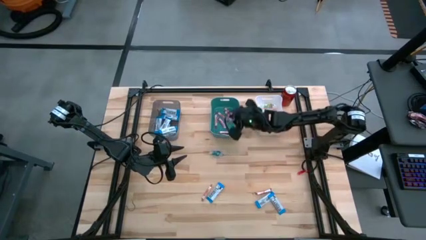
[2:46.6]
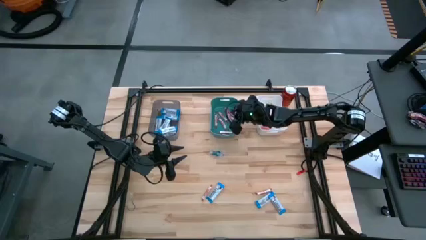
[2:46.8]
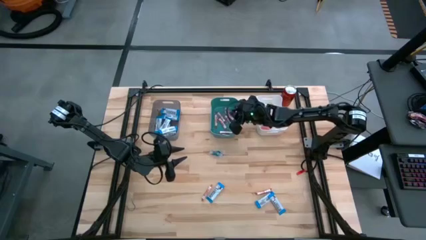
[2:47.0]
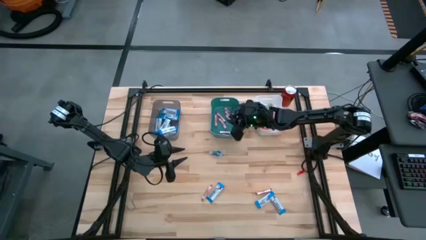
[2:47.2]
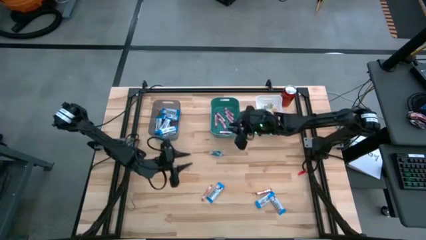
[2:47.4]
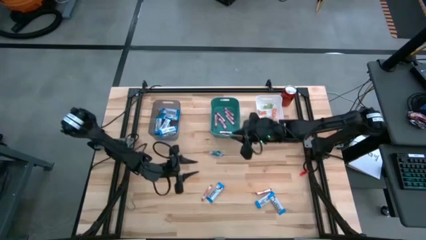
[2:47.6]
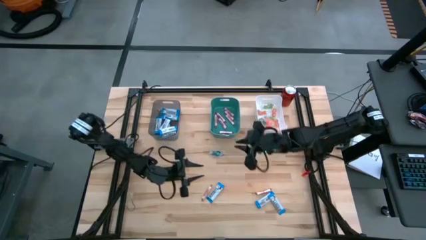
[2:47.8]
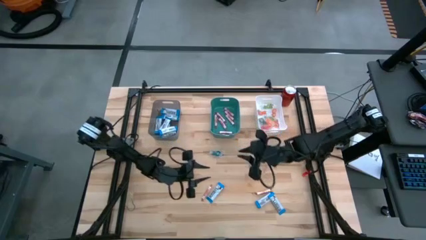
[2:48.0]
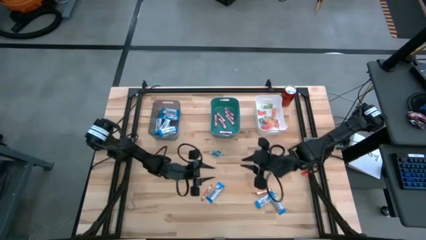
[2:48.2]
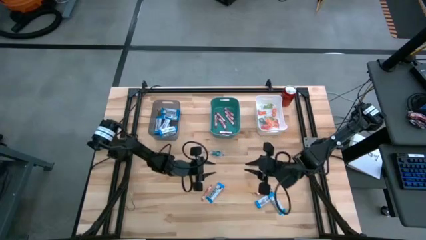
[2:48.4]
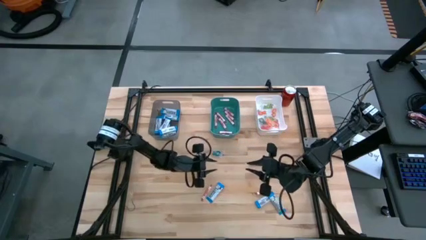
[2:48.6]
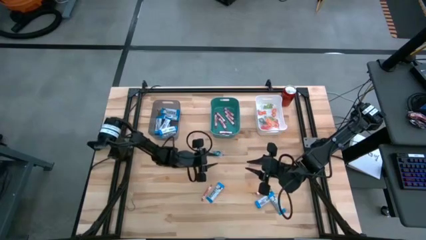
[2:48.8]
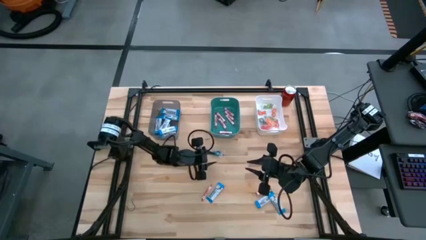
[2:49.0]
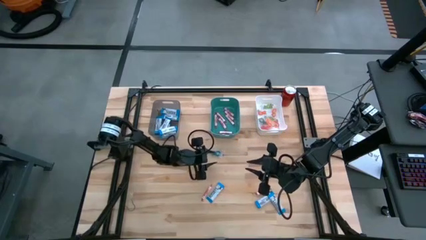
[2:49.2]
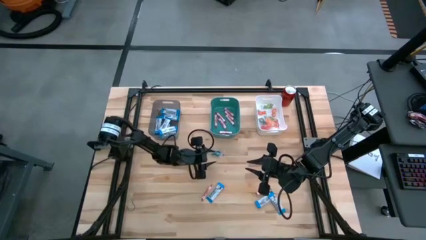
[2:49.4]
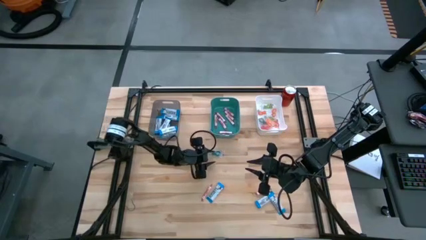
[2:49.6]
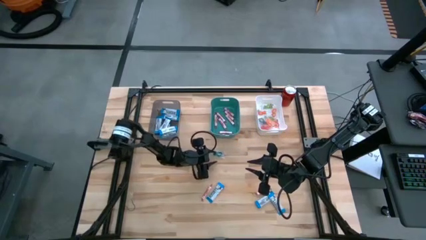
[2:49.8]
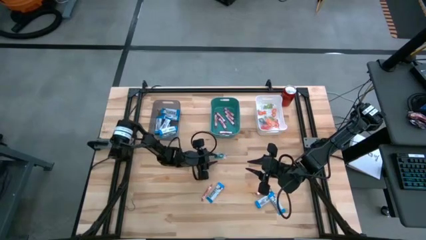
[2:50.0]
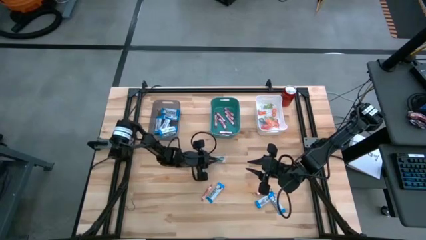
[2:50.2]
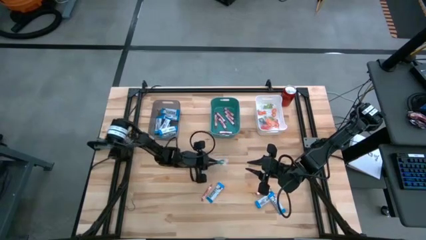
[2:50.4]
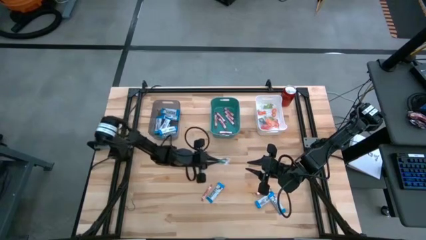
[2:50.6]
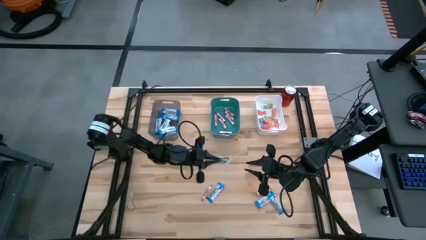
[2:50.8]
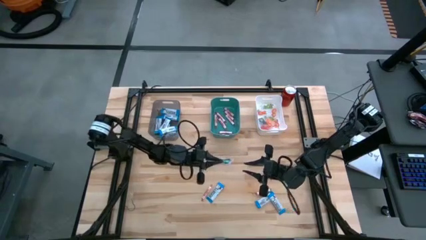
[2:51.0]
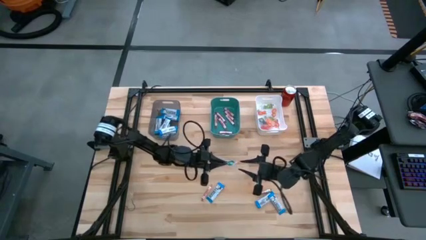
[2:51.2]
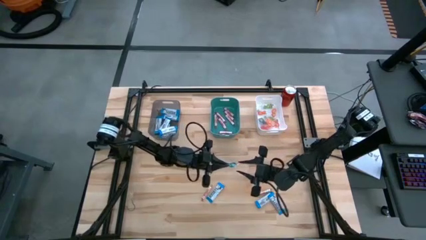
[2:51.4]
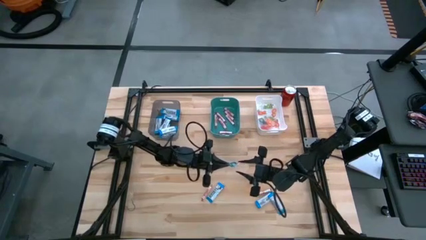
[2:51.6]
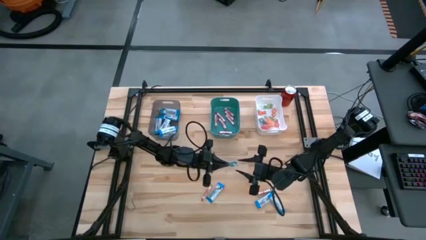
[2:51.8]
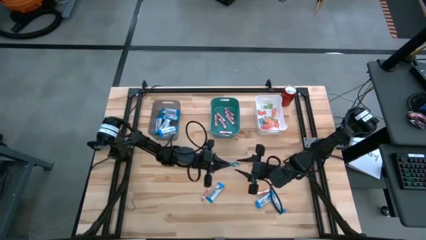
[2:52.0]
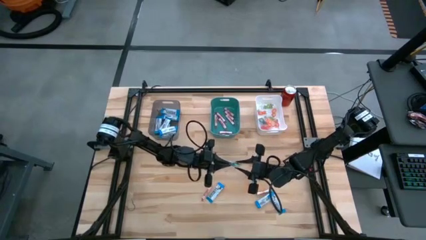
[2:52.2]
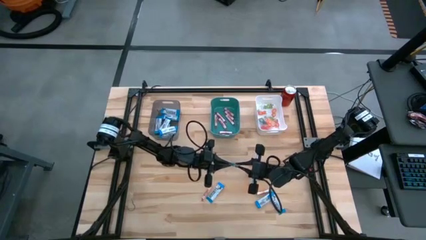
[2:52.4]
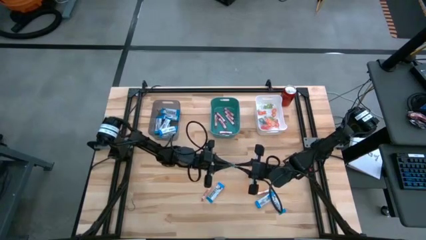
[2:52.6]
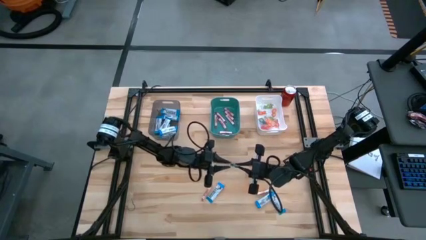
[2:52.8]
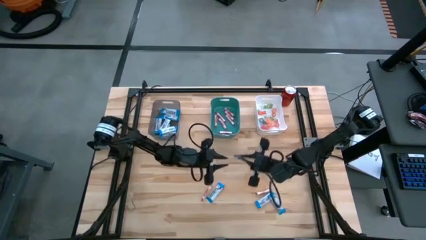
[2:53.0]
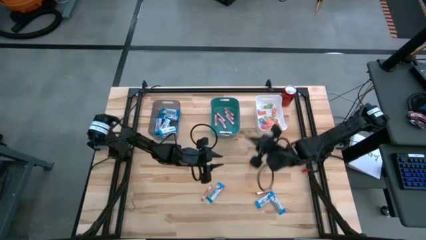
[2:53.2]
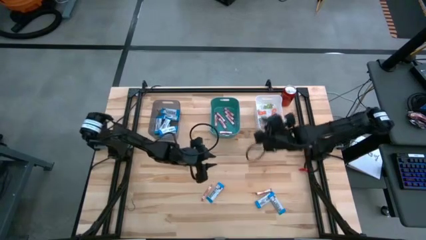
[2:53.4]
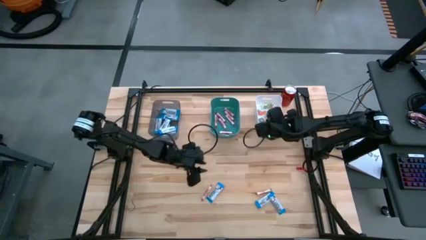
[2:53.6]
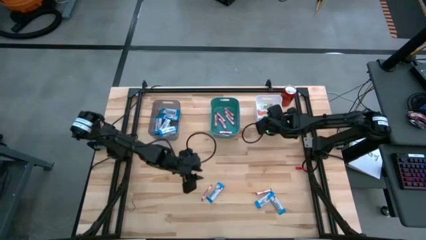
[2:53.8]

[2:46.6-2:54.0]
Task: Sort candy
Put the blue gummy into the white bin

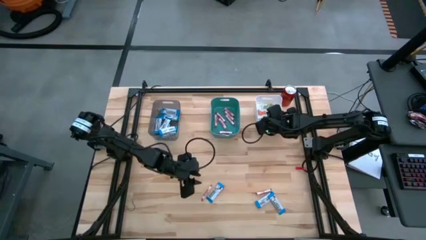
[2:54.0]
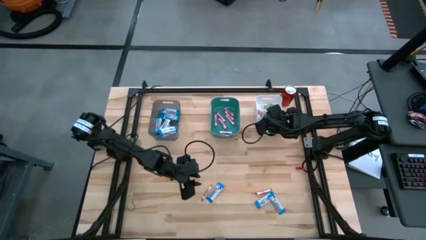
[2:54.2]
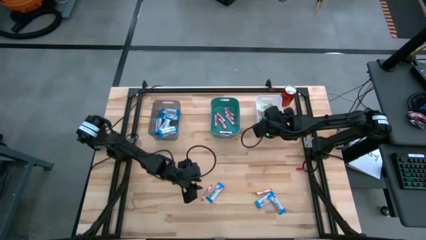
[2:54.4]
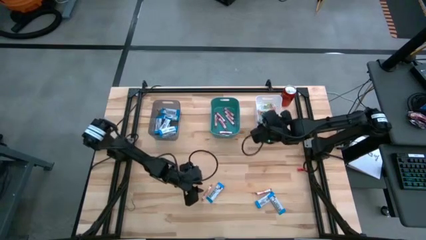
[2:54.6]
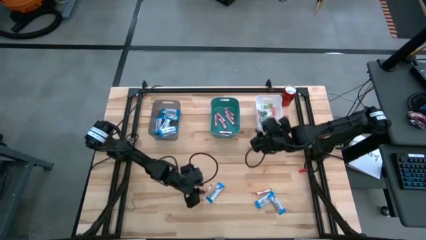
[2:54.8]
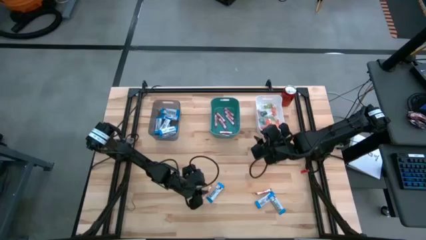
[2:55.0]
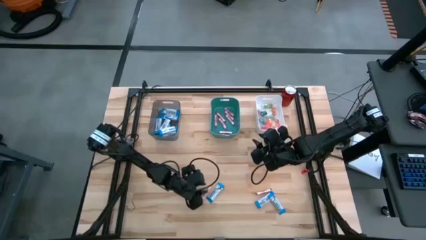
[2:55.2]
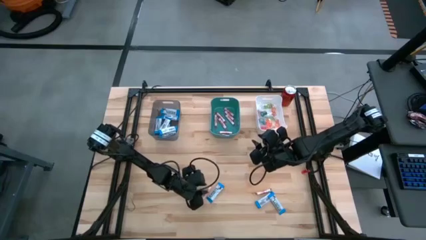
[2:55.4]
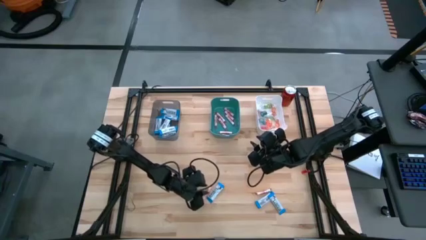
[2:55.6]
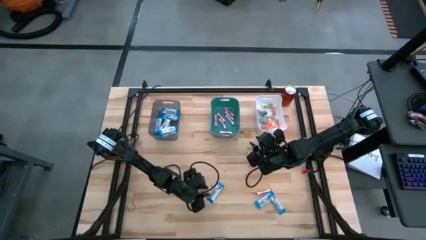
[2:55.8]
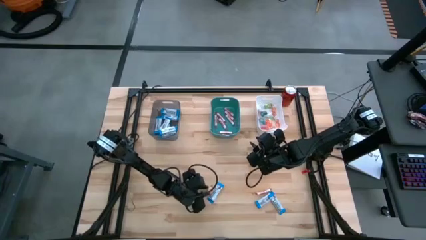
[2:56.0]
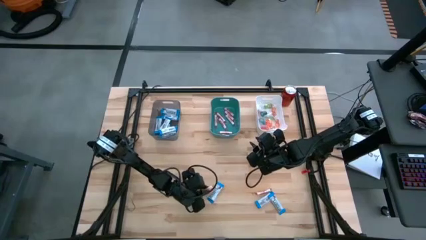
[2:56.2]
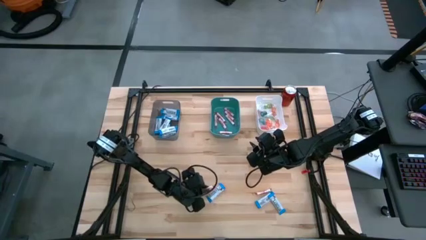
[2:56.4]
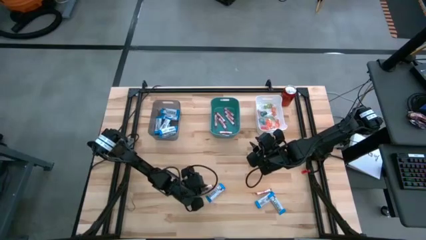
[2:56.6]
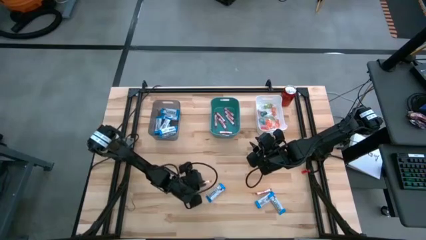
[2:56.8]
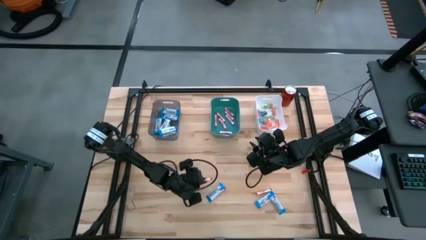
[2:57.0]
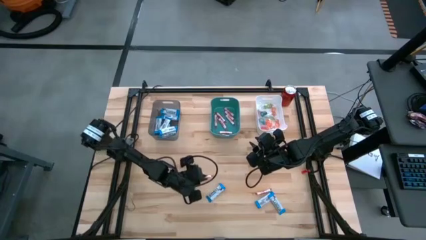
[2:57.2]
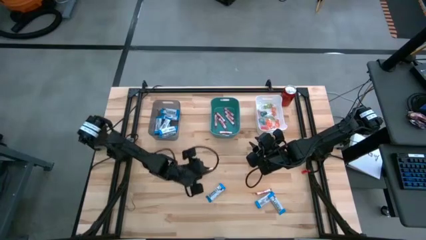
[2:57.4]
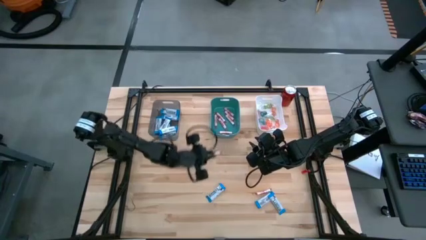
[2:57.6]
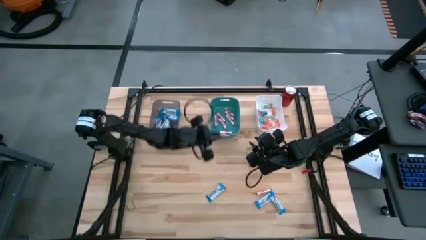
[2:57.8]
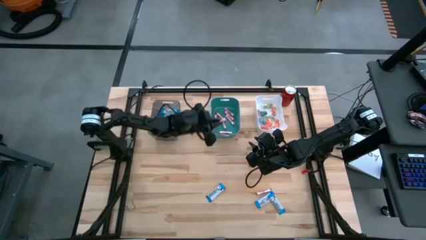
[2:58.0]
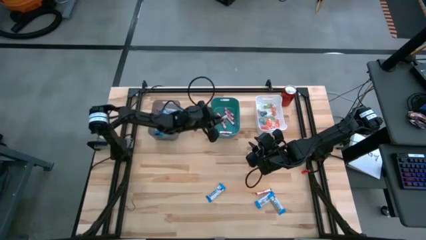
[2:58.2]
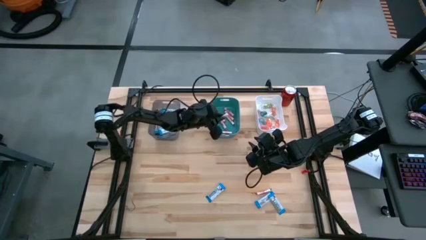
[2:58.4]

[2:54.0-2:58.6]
Put the red candy into the blue bin

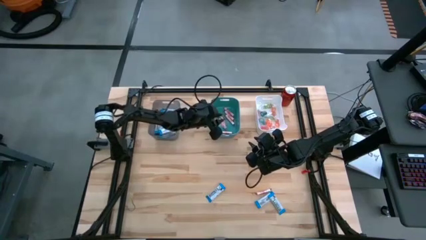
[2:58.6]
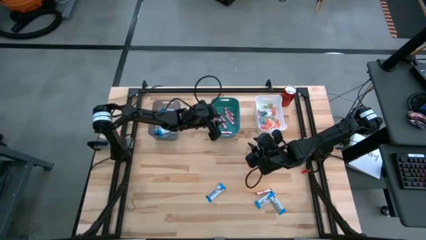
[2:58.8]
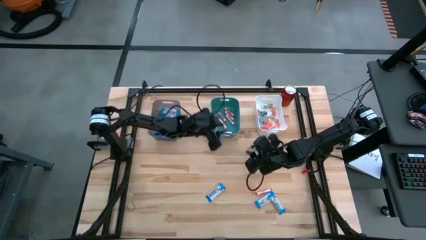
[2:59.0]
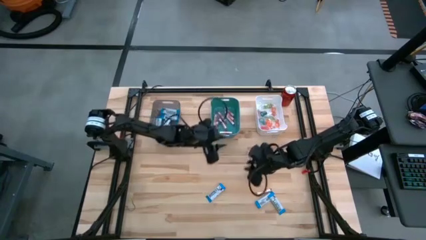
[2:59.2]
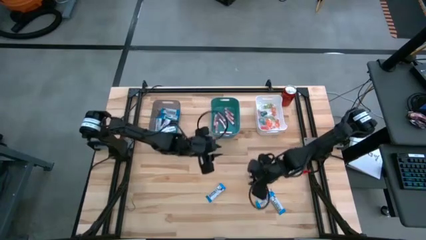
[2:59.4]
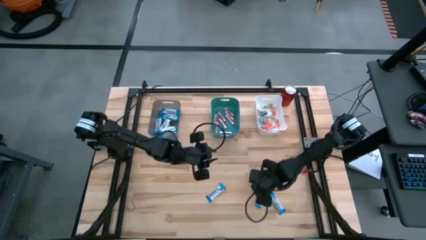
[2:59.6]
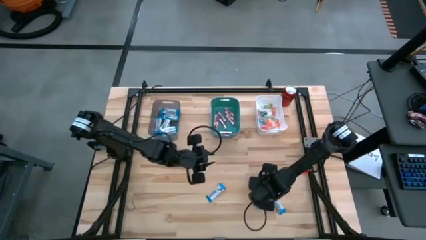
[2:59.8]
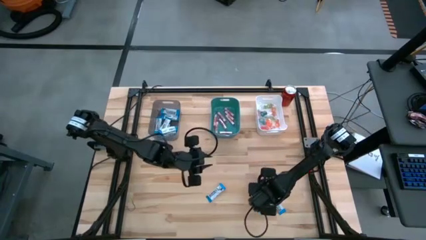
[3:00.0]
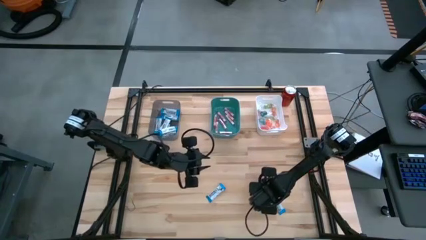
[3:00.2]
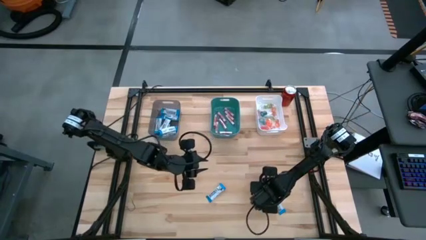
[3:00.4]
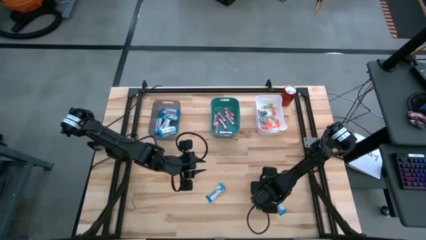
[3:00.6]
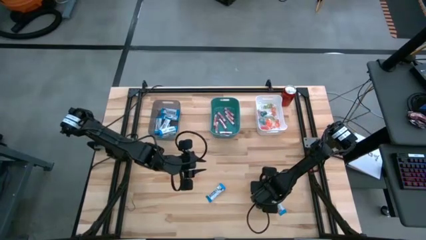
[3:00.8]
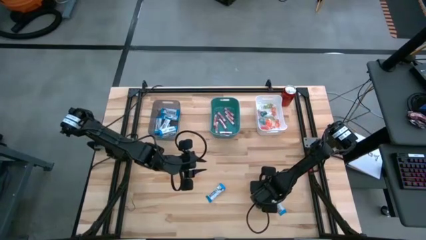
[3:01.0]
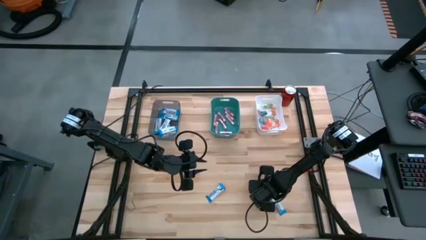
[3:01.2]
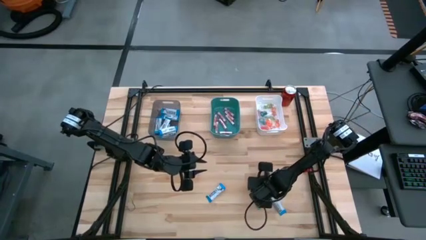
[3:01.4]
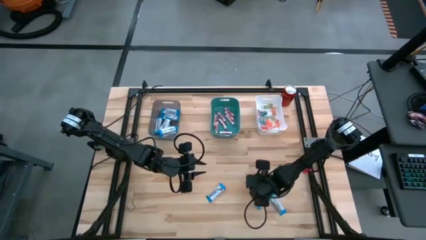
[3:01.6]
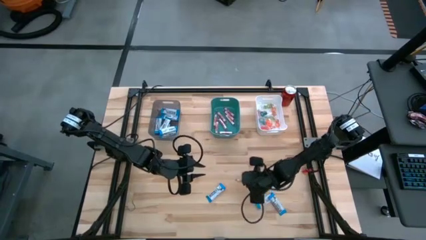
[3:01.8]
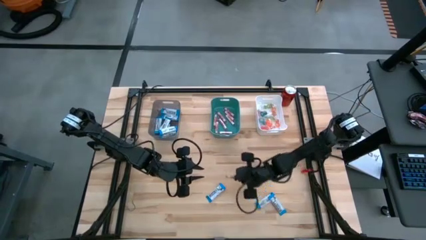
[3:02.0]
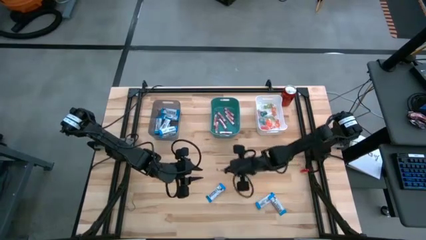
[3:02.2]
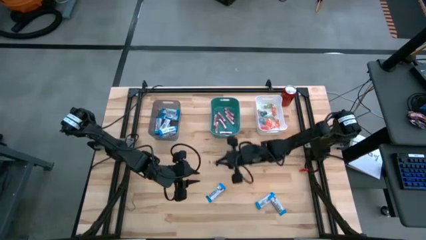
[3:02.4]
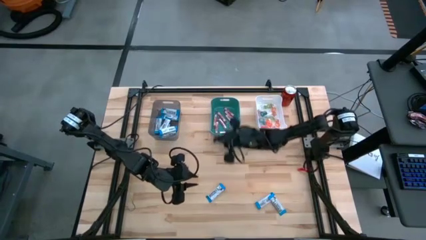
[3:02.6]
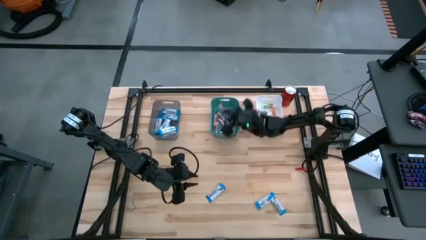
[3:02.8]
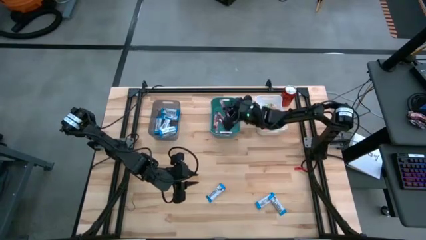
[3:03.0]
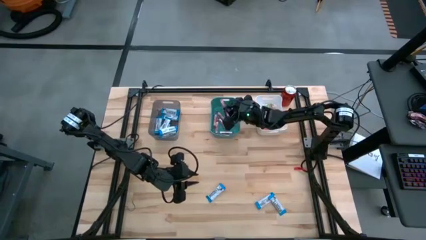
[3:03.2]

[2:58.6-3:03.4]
Put the red candy into the blue bin
